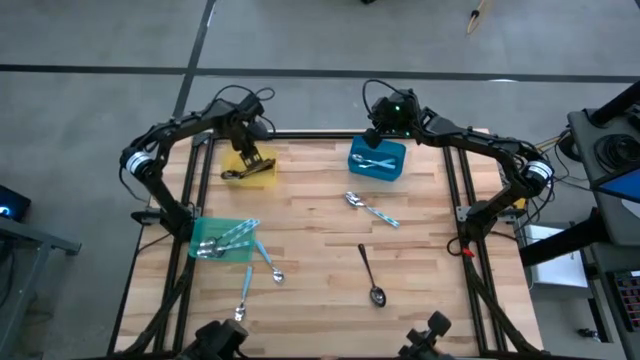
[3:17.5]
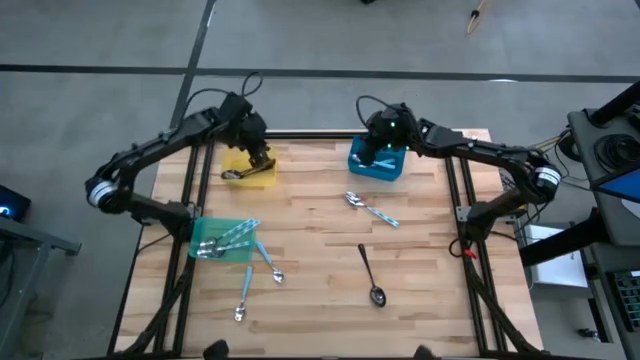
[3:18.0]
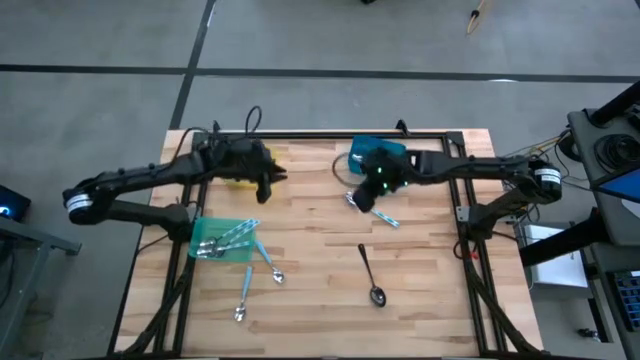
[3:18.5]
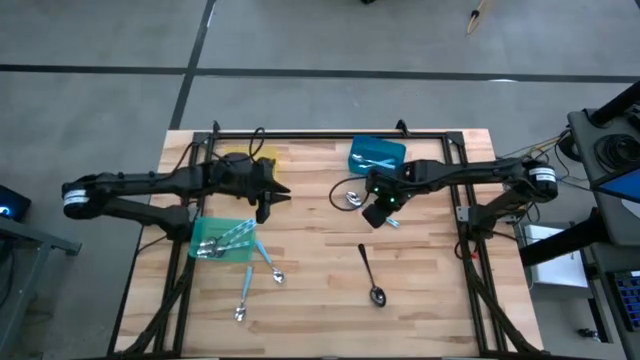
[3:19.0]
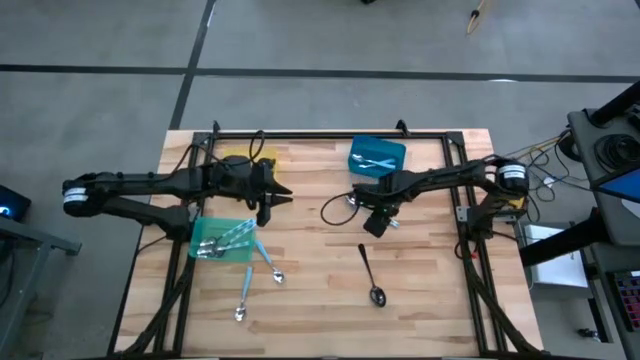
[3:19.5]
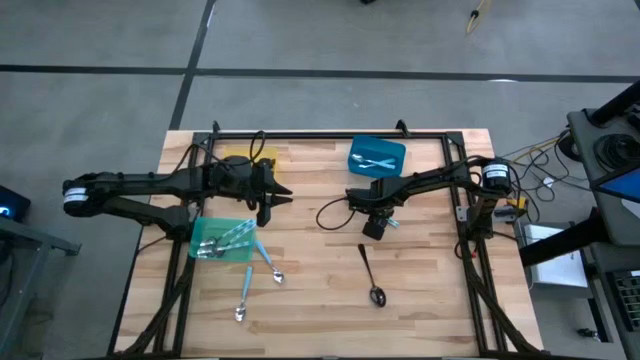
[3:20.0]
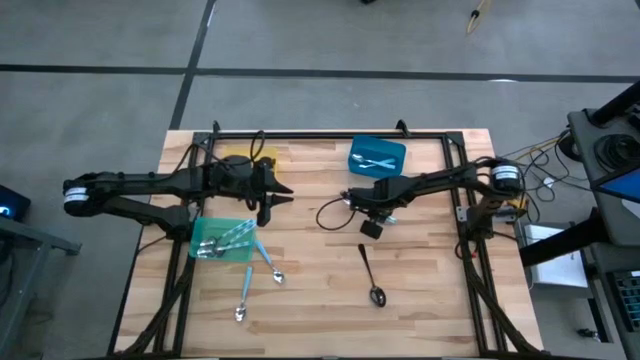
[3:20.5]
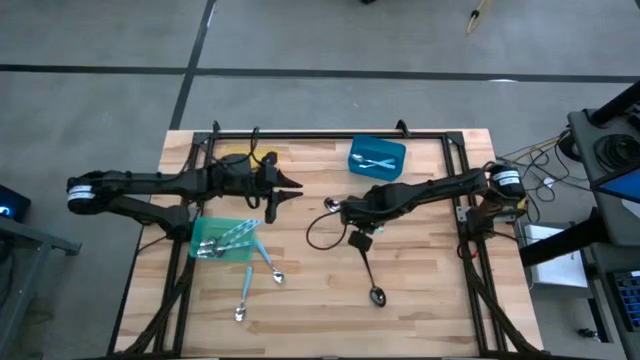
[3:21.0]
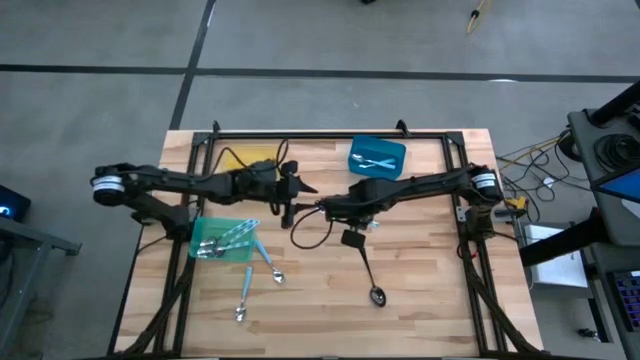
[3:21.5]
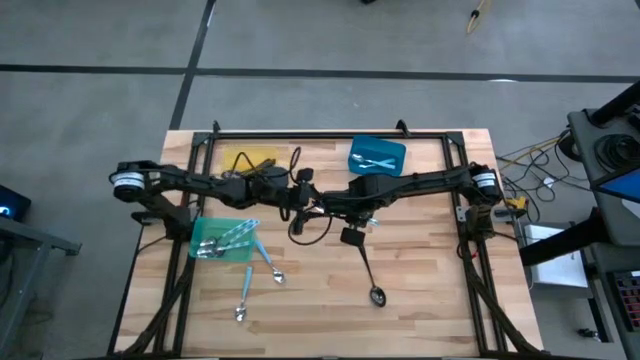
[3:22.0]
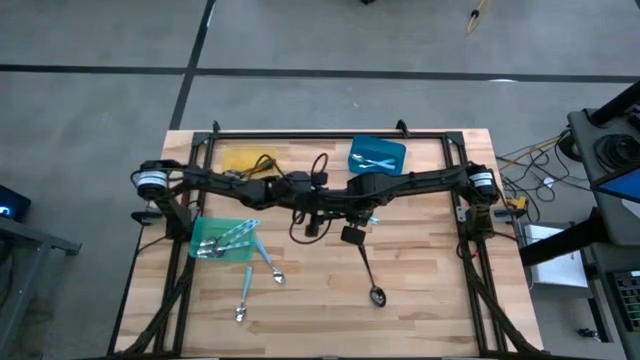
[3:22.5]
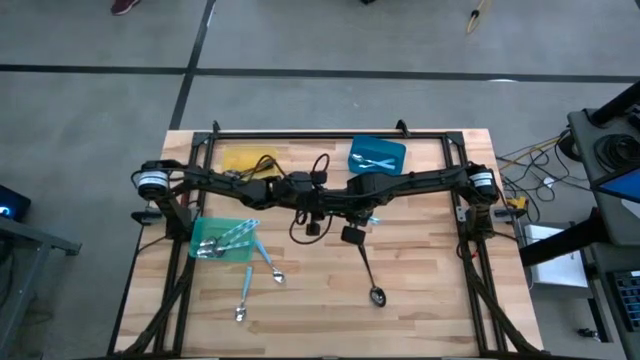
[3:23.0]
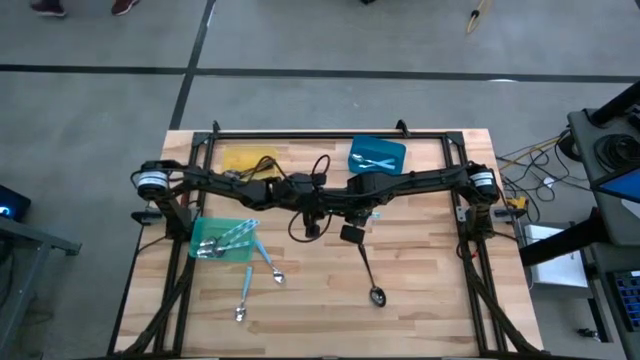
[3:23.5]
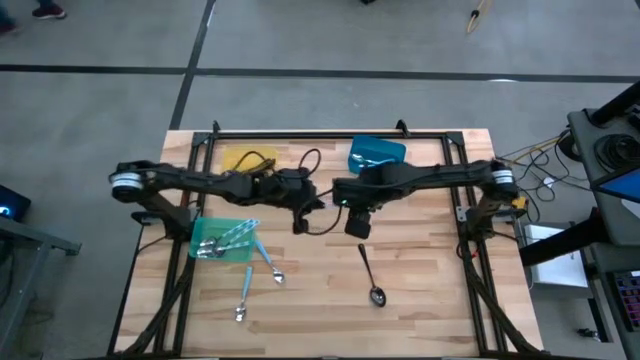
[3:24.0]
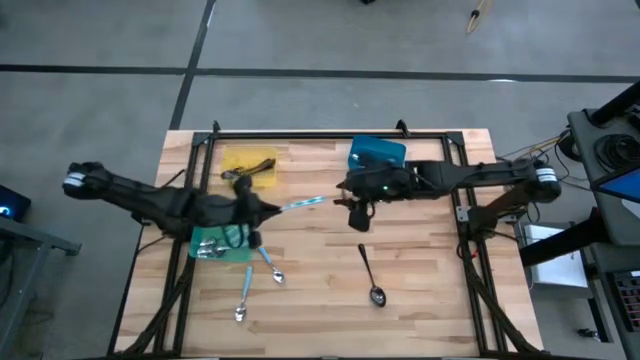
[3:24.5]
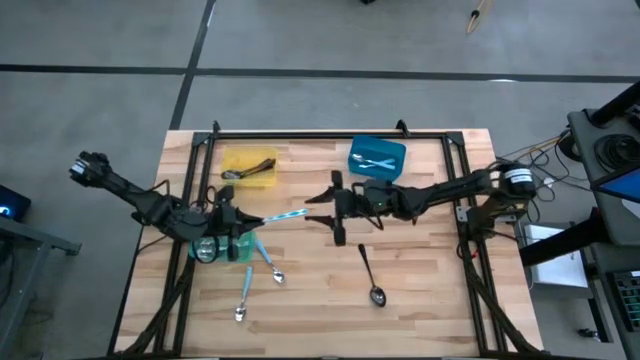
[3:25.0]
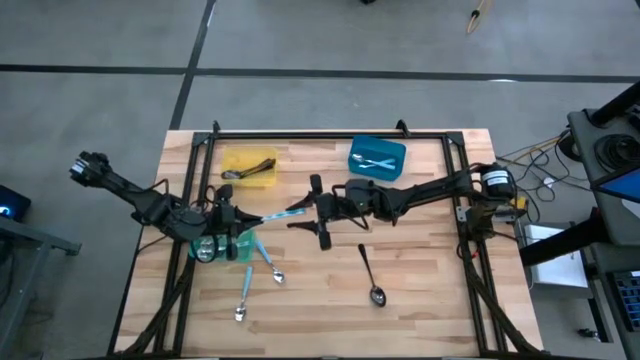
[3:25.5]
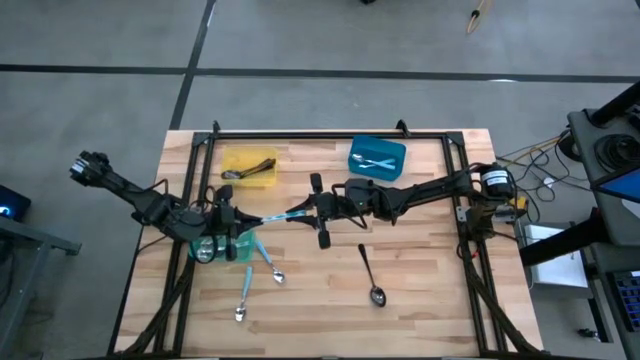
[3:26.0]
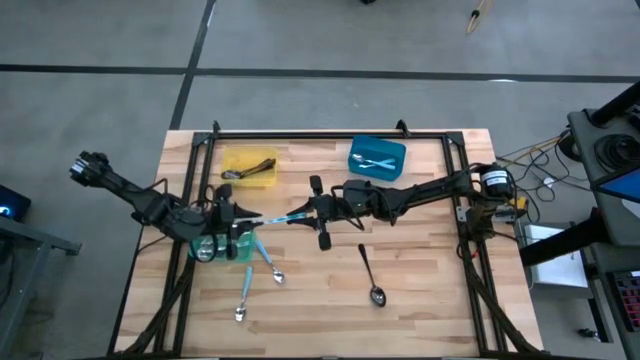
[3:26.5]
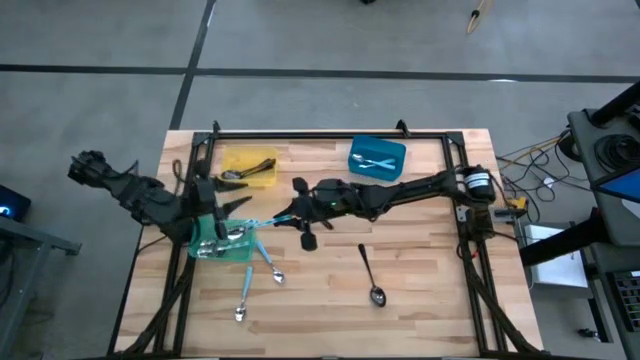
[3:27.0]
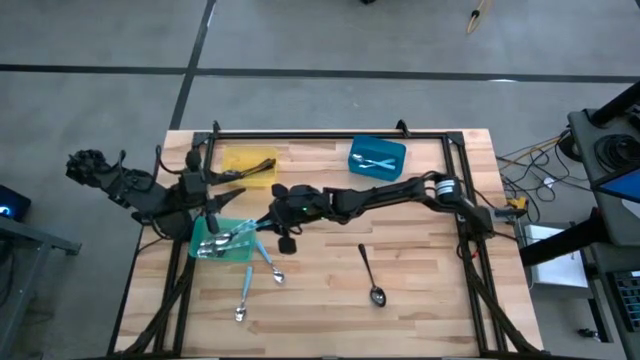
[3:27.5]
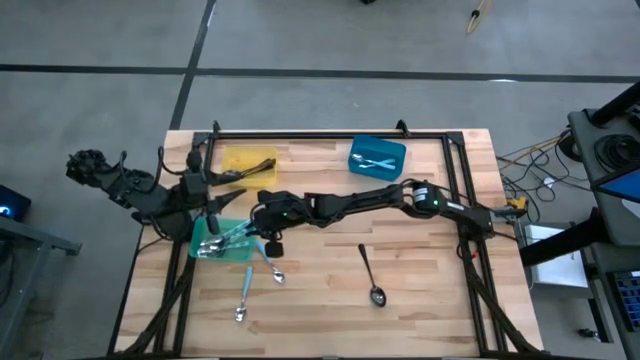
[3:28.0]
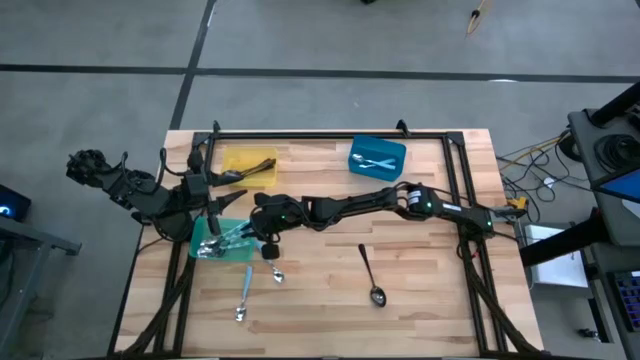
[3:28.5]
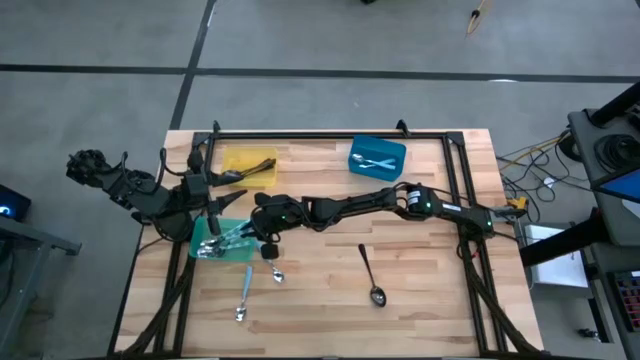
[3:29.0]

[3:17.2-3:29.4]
Task: Sort silverware by color (type)
Put the blue patterned spoon into the green bin

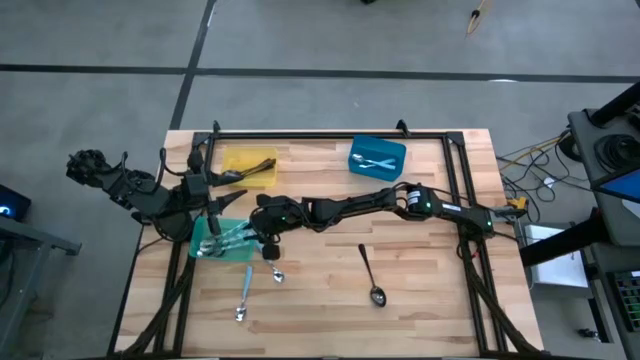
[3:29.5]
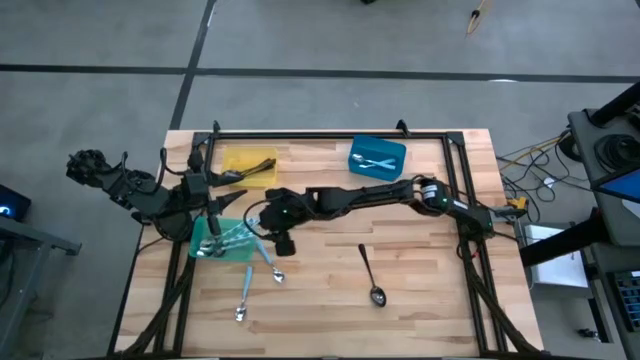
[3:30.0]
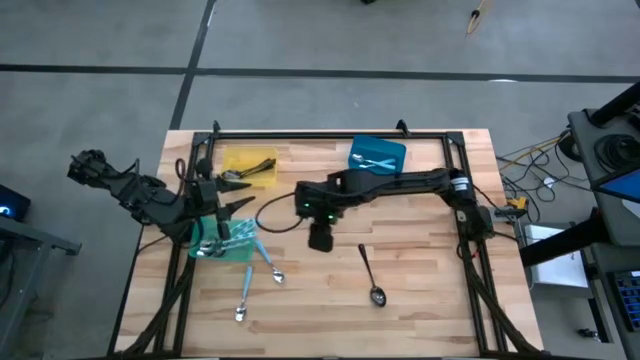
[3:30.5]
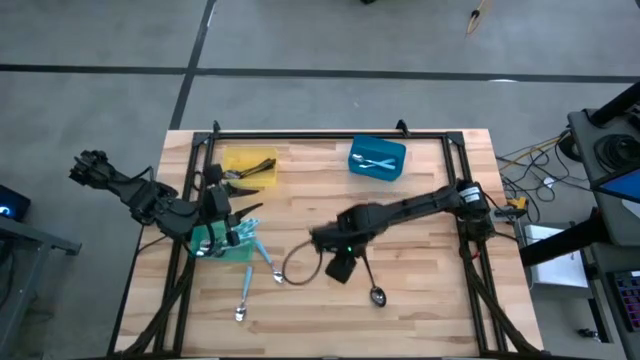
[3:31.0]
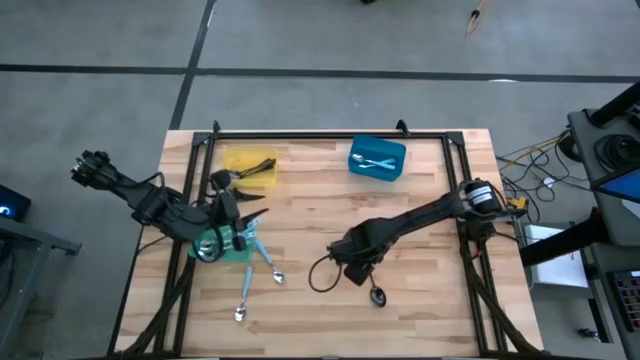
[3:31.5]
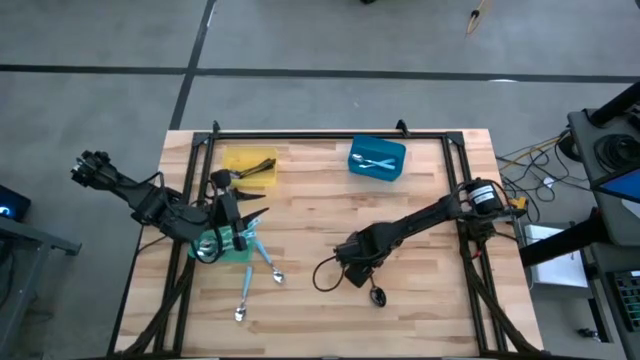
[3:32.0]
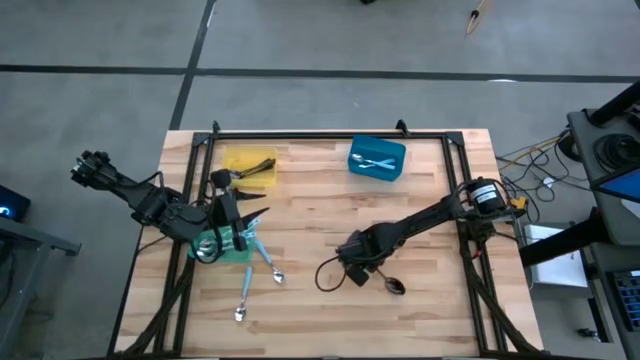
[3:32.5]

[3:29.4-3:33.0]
Put the black spoon into the yellow bin

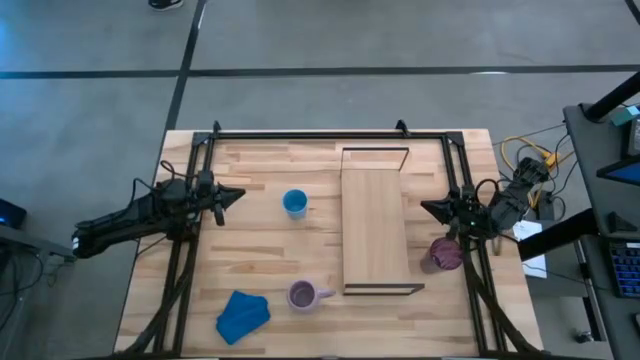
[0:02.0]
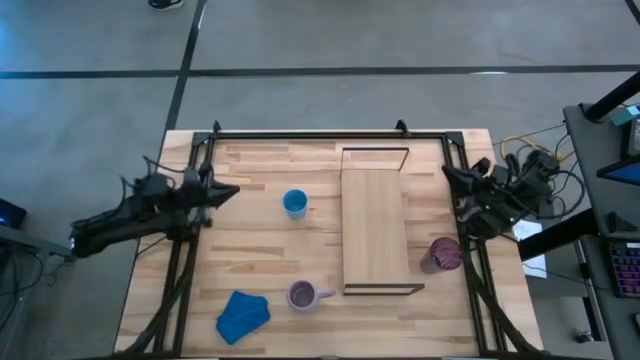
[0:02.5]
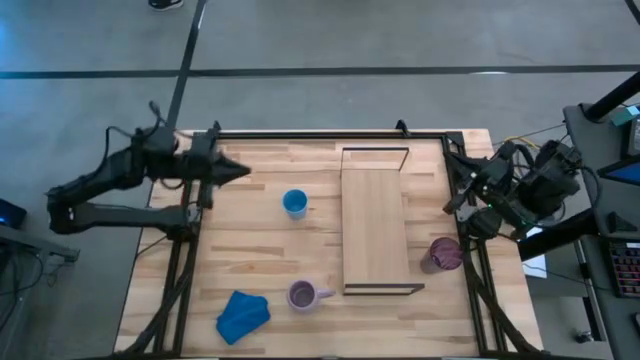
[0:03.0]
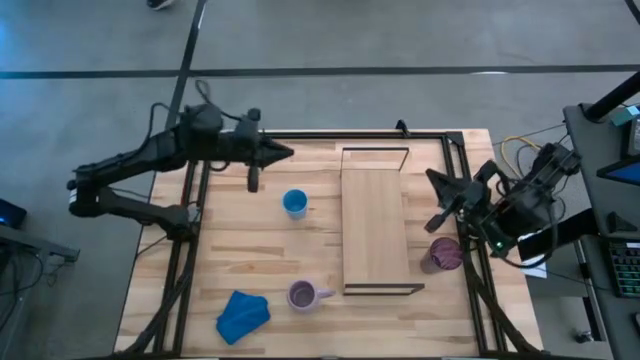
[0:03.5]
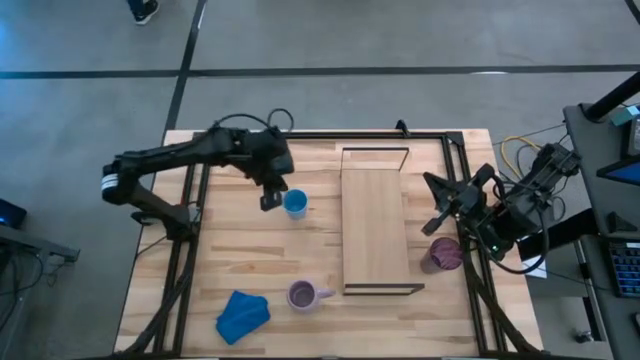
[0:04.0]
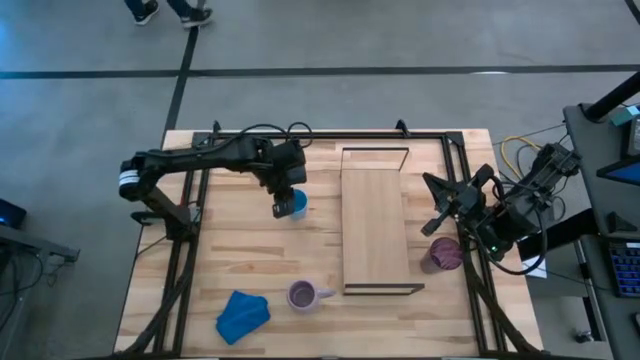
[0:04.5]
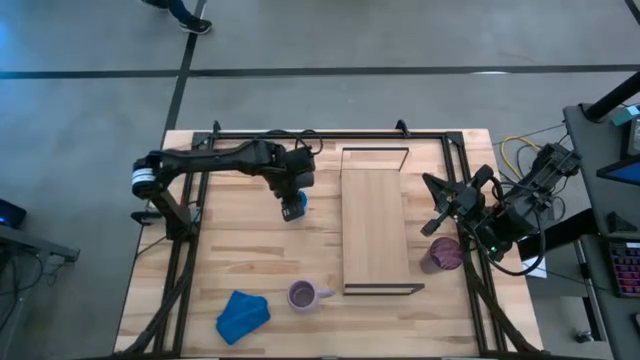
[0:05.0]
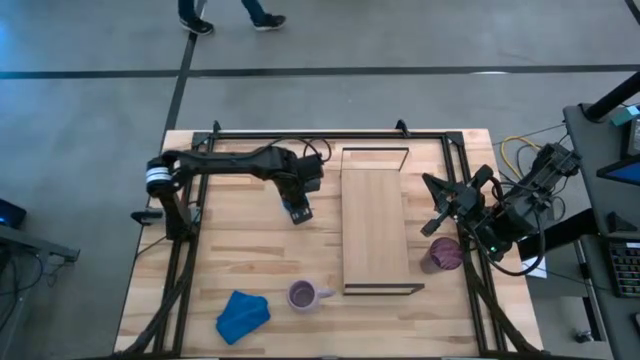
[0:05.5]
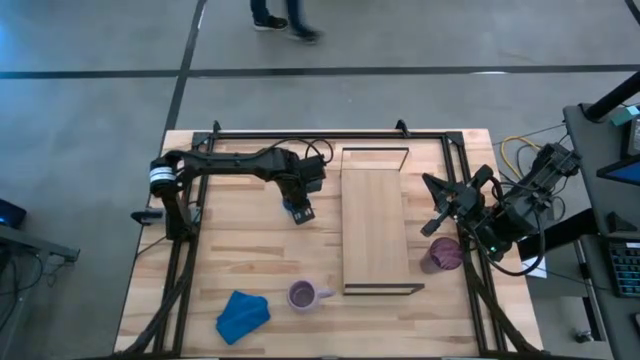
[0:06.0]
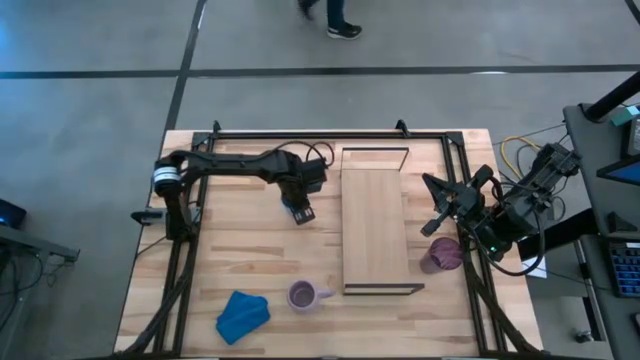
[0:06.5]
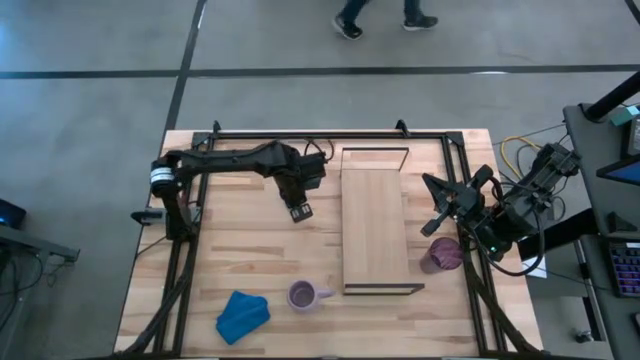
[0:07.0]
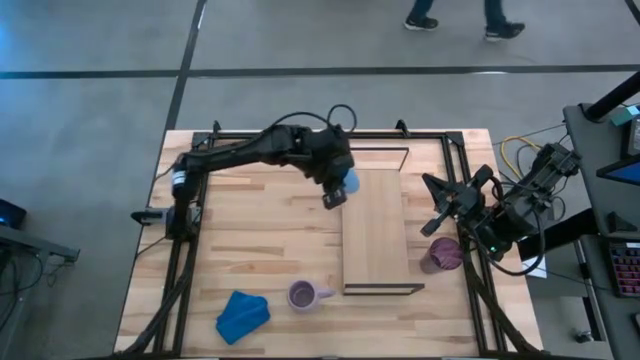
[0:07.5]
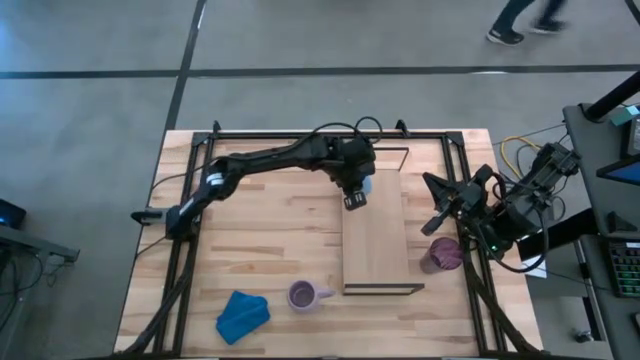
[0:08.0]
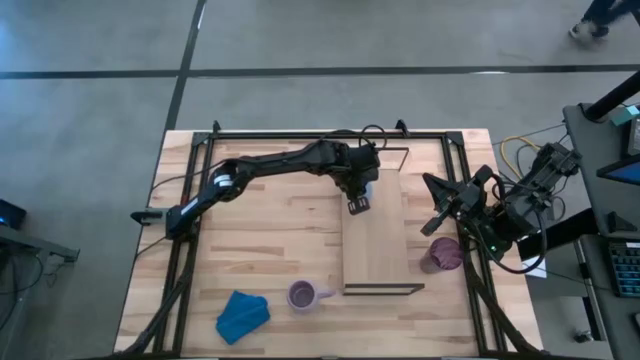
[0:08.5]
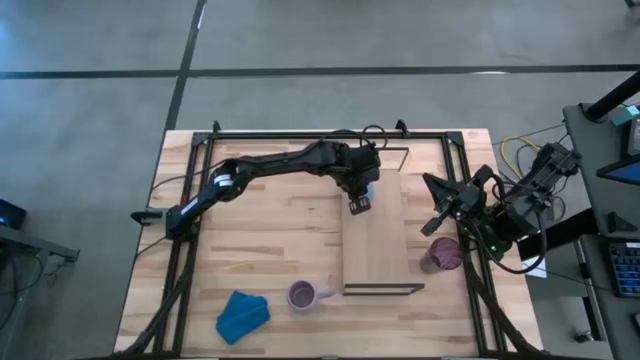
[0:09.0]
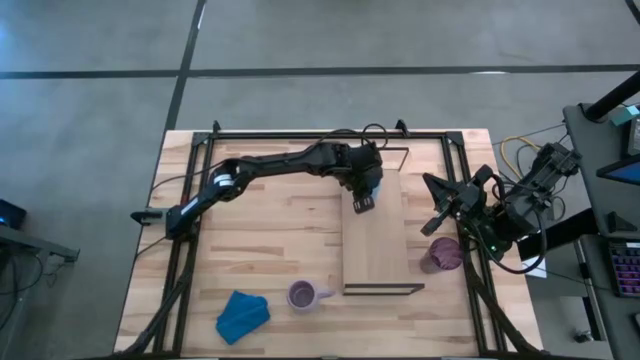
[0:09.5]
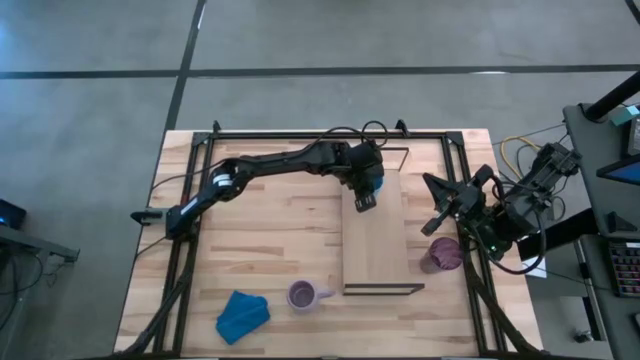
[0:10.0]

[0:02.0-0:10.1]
Task: Stack small to large cups/mugs on shelf
Put the blue cup on the shelf
